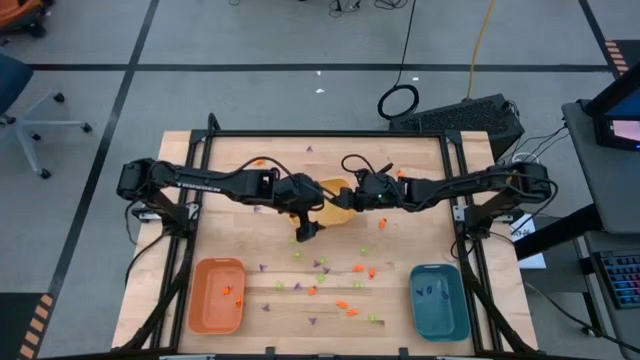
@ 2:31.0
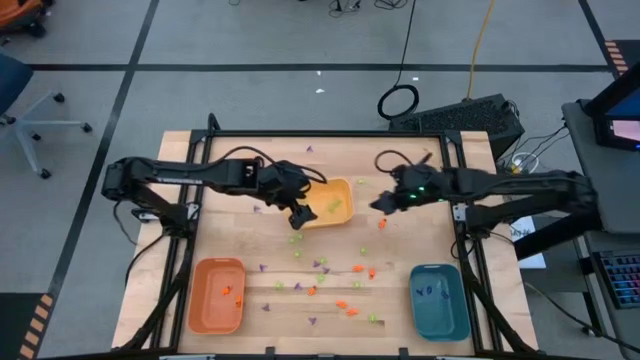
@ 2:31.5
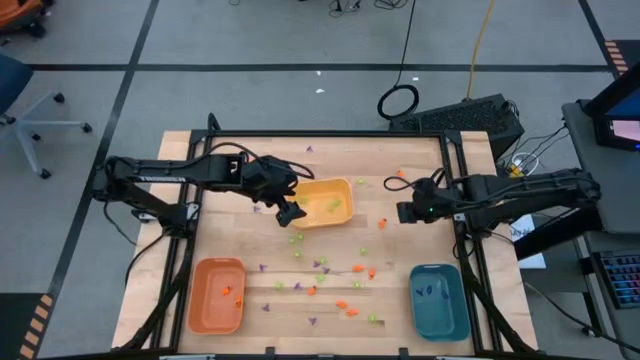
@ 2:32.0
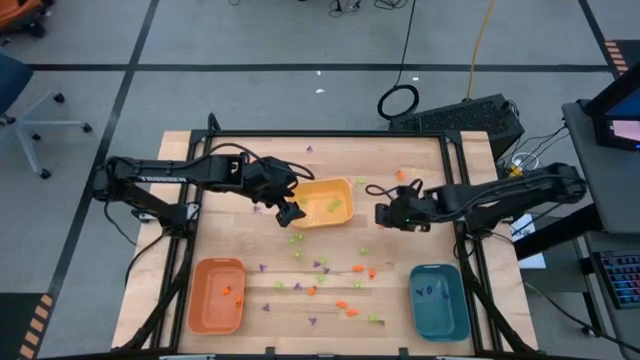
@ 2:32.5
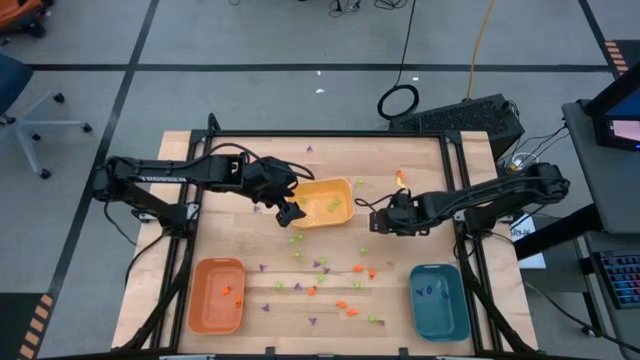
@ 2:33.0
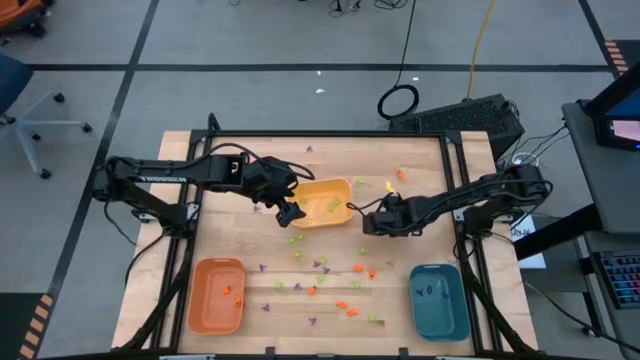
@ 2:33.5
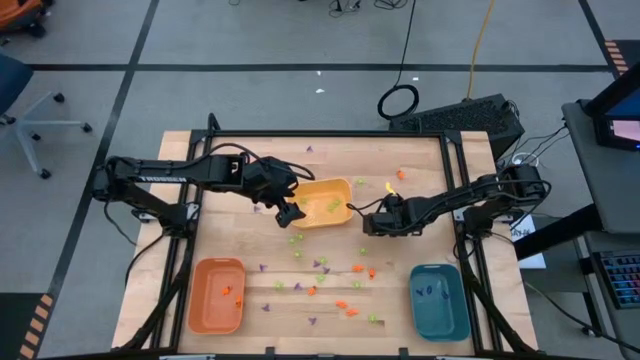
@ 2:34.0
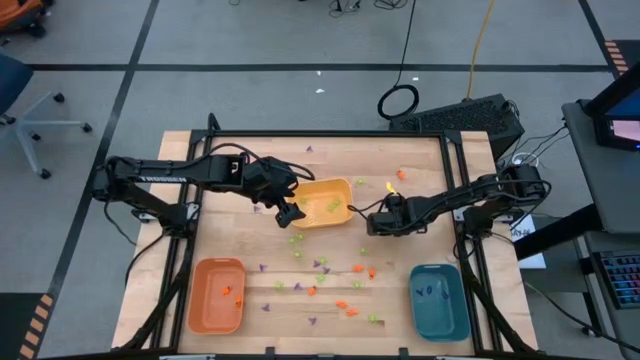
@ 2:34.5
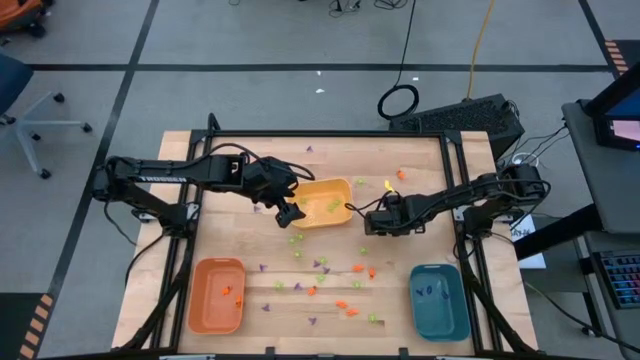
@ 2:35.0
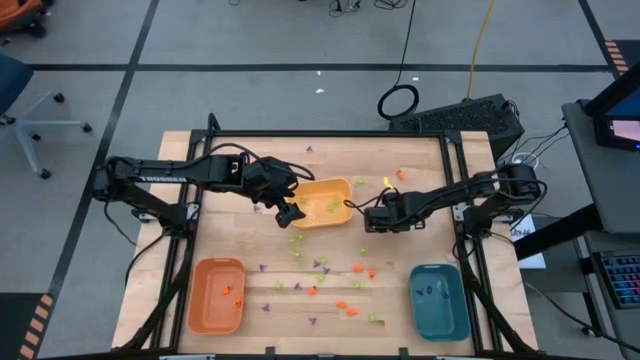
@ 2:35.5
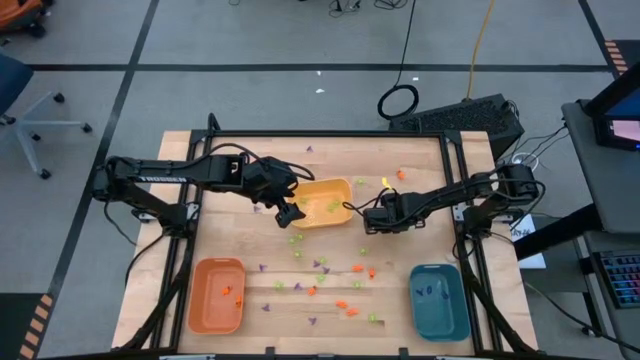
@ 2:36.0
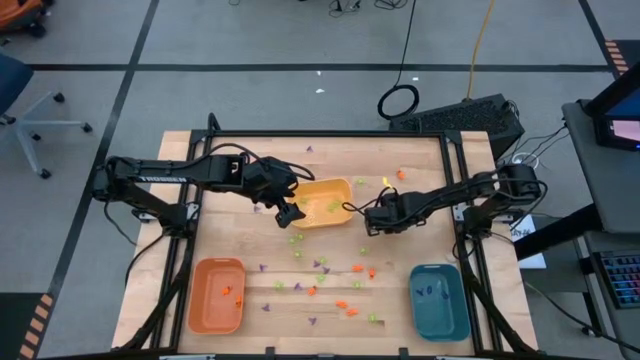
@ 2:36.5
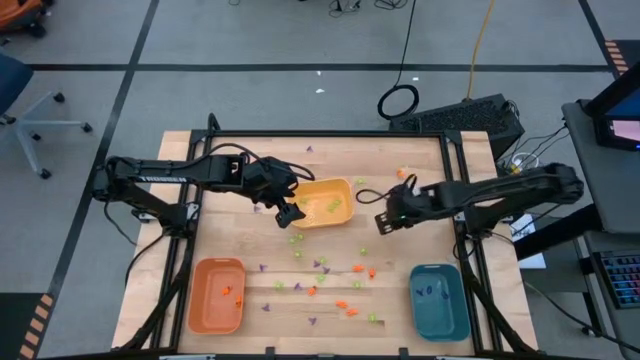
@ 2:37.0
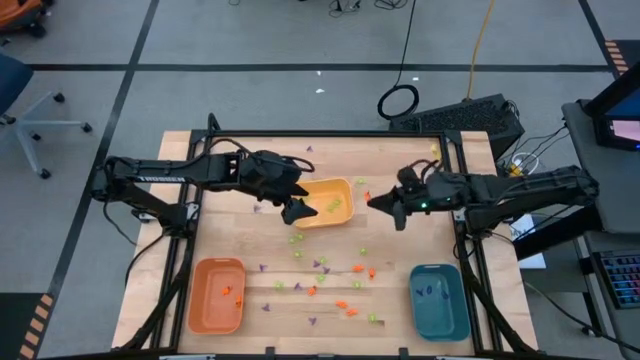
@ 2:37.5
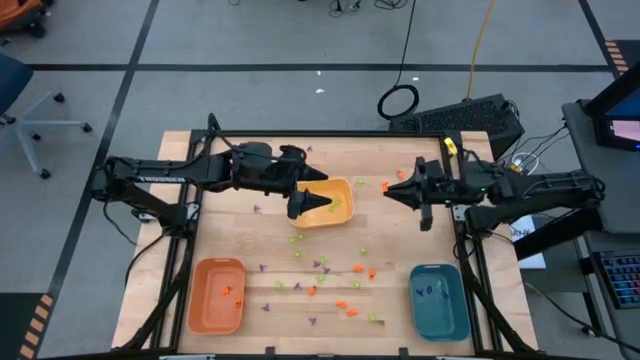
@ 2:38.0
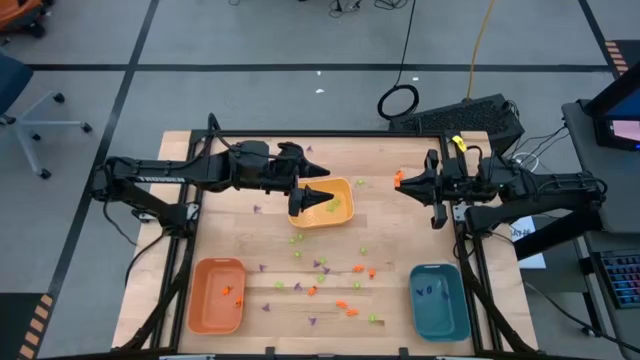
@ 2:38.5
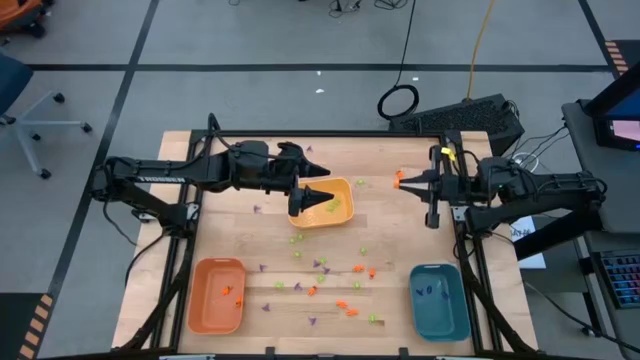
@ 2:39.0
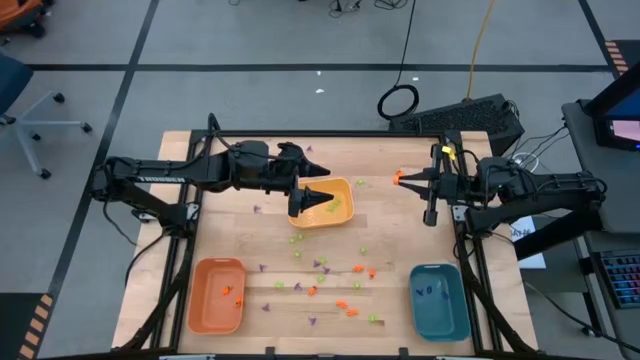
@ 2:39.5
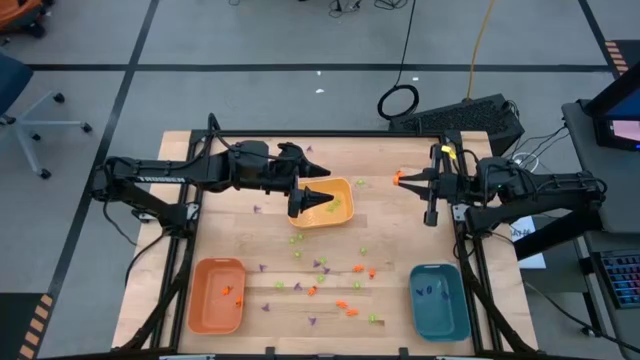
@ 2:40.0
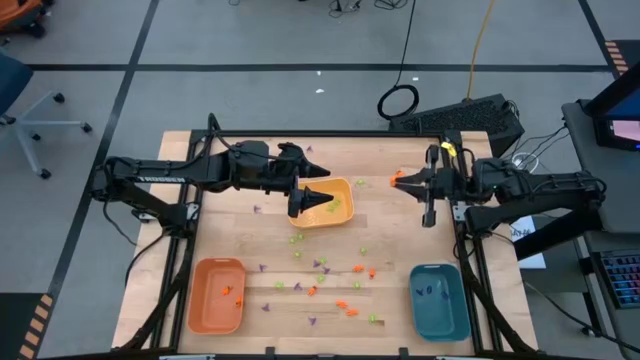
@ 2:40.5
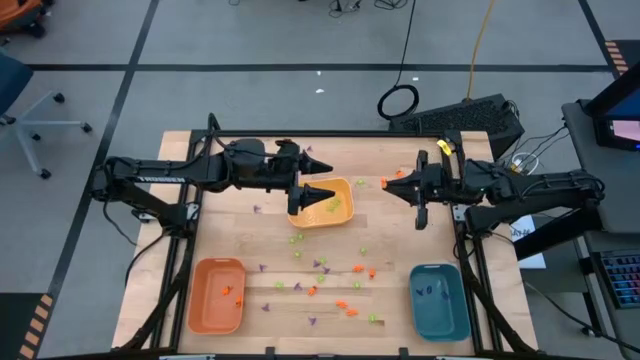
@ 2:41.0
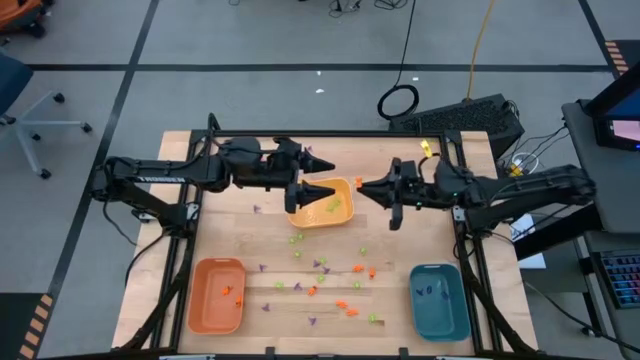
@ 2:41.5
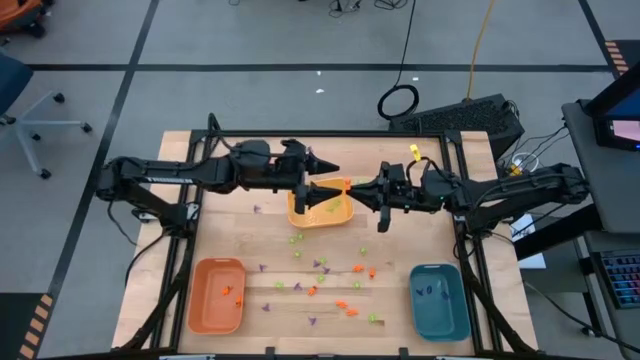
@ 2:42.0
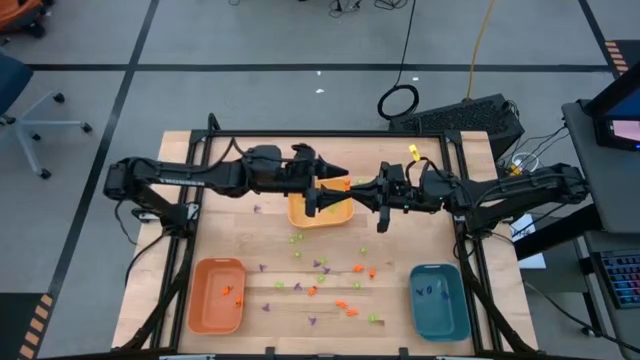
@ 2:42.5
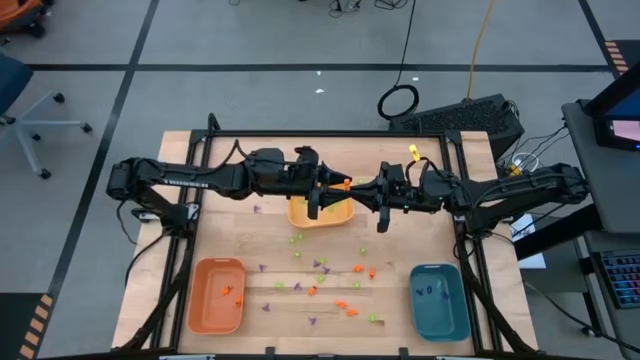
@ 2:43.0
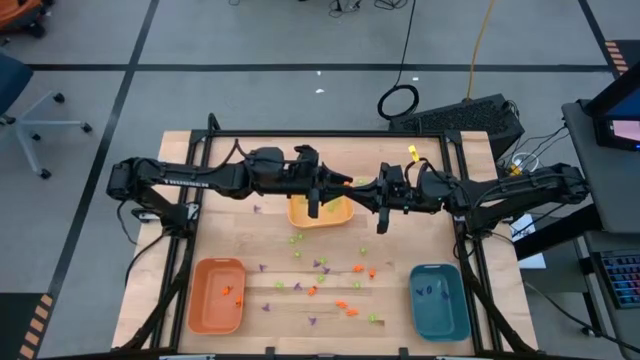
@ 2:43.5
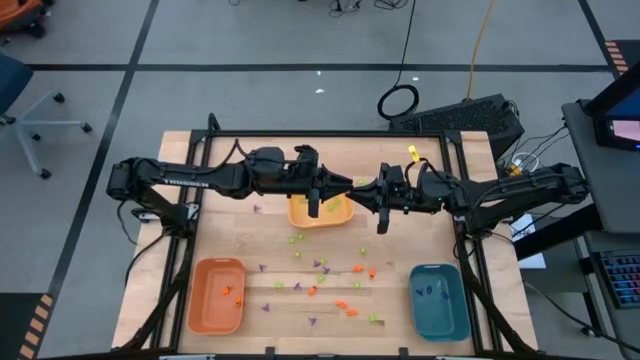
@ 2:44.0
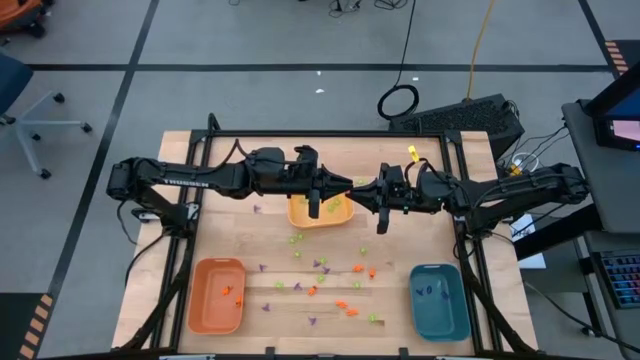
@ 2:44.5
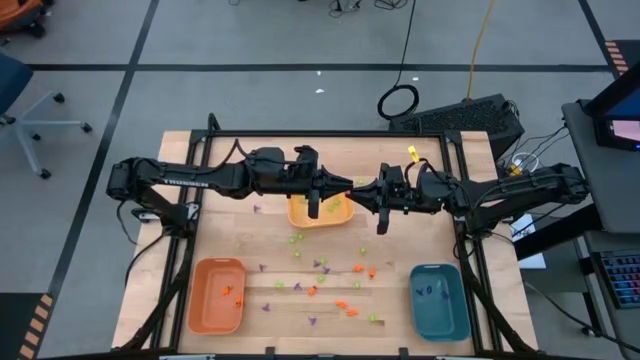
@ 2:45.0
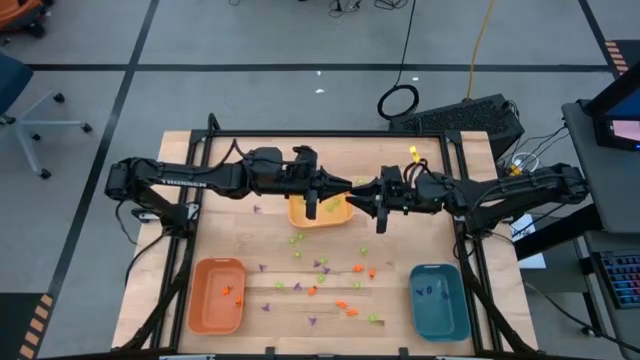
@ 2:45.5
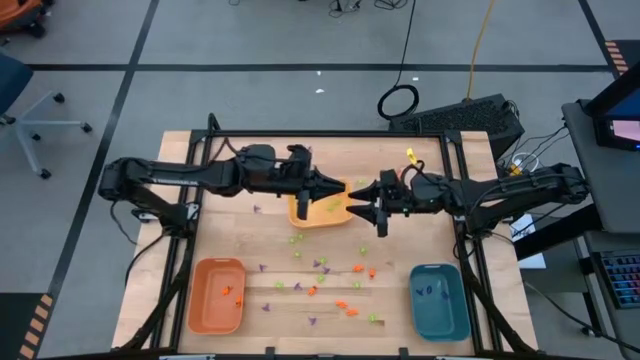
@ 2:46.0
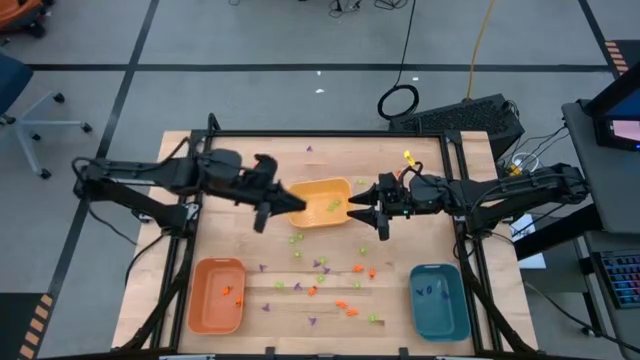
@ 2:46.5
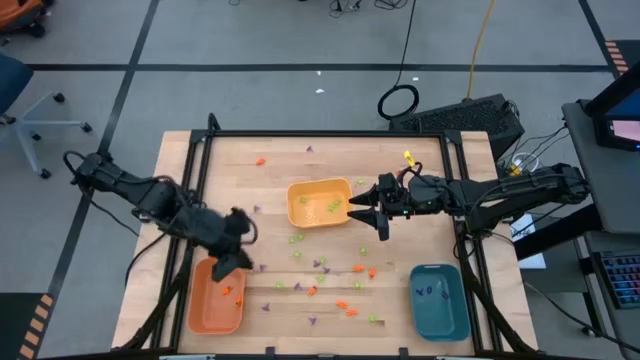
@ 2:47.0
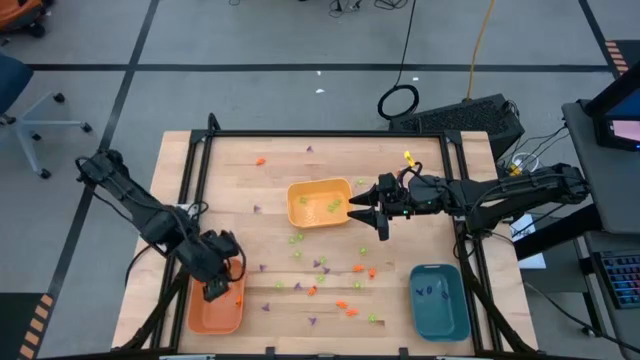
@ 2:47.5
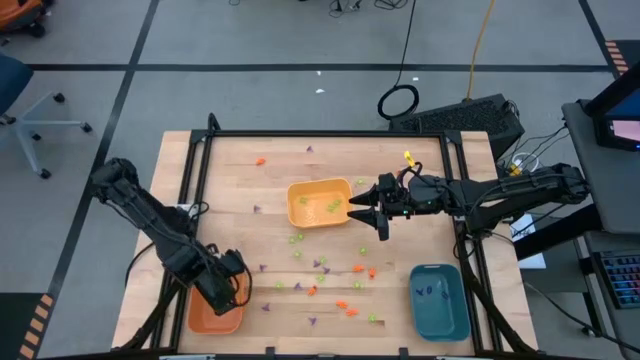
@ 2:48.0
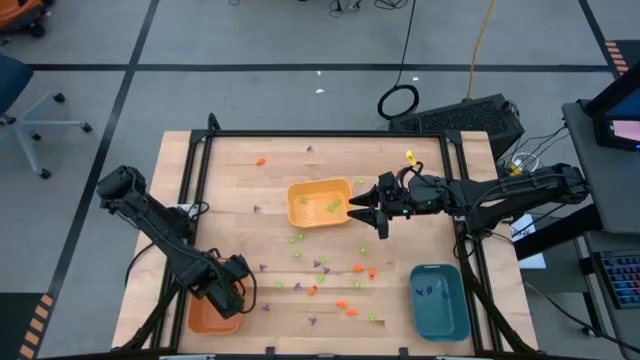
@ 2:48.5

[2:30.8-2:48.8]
Task: Sort Halloween decoration
Put the orange skeleton toy into the orange bin

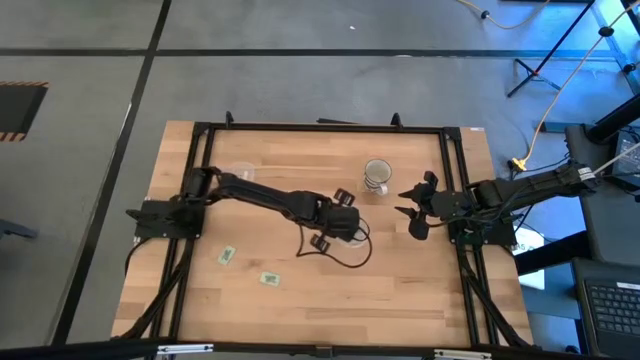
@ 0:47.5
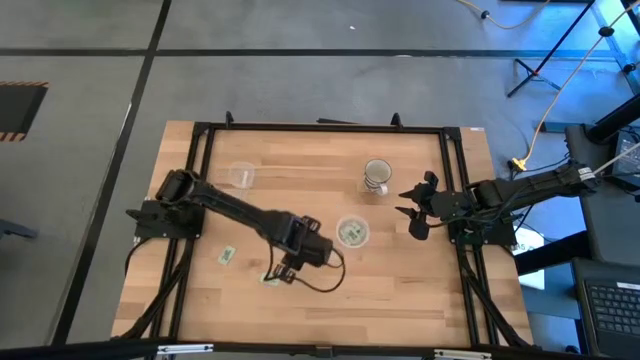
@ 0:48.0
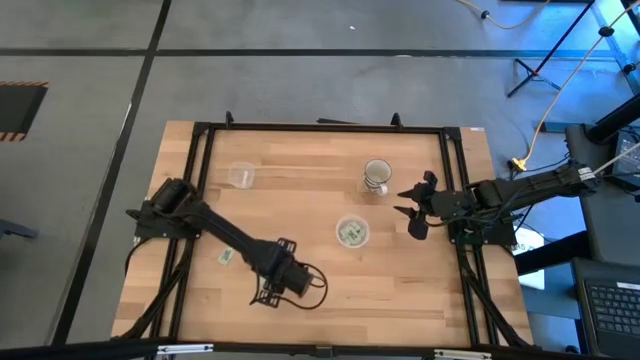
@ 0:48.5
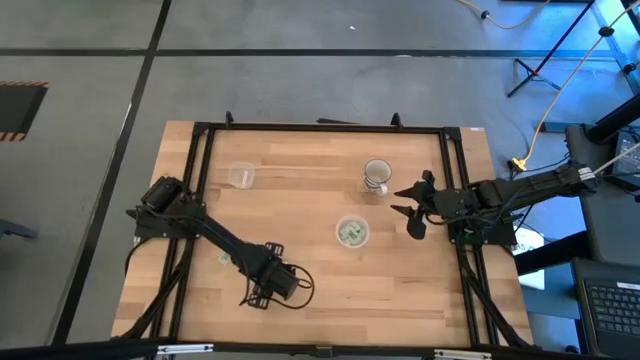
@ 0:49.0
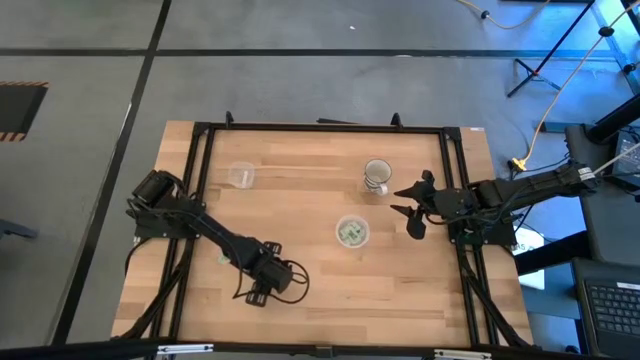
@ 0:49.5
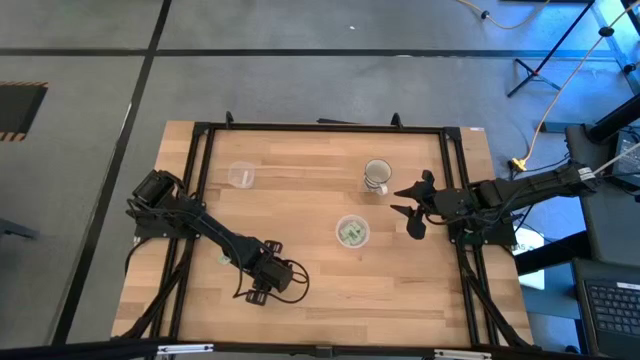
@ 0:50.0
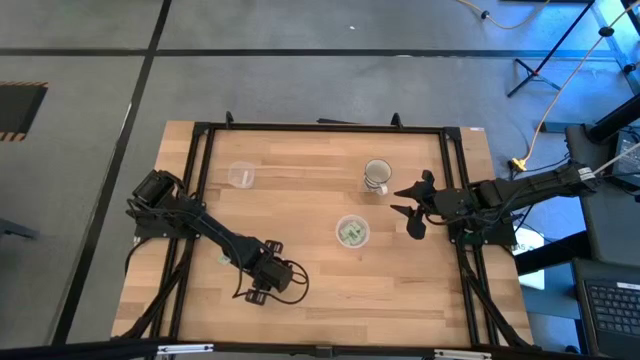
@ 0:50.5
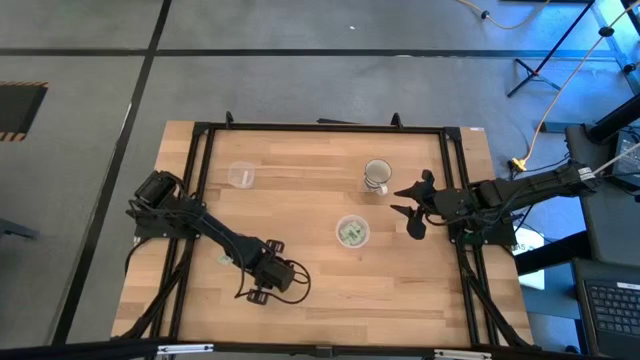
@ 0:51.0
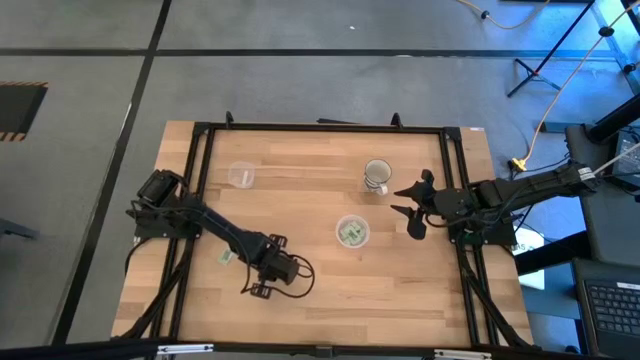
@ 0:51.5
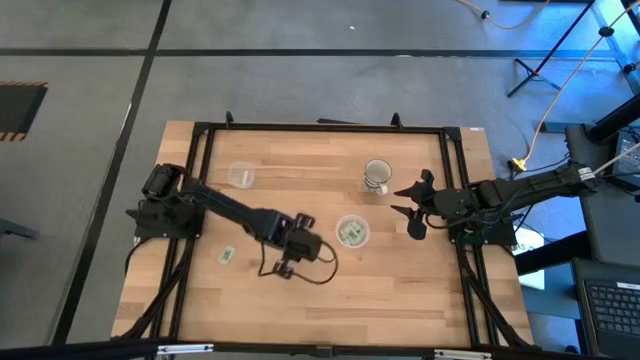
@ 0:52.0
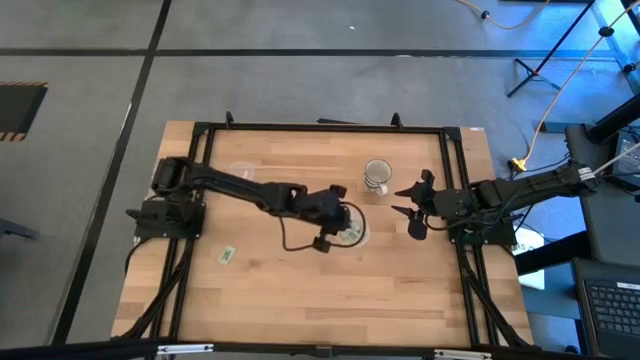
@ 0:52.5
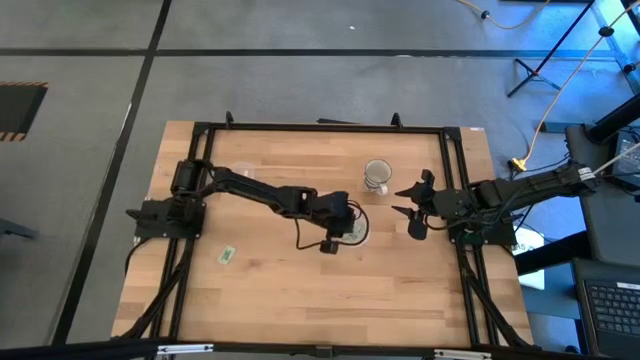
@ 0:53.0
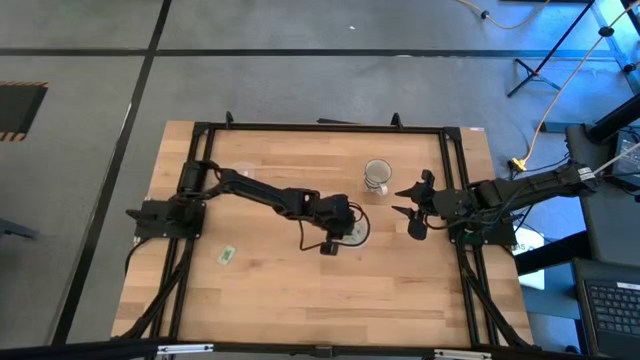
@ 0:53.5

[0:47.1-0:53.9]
Task: Pick and place Stevia / Truvia into bins
Put the green stevia packet into the circular transparent container
